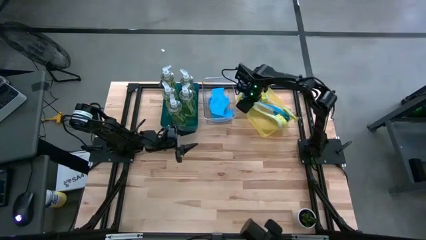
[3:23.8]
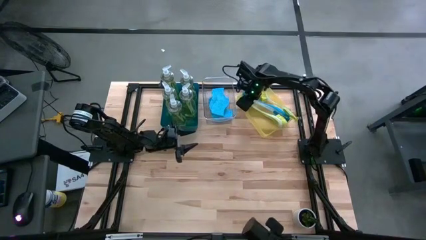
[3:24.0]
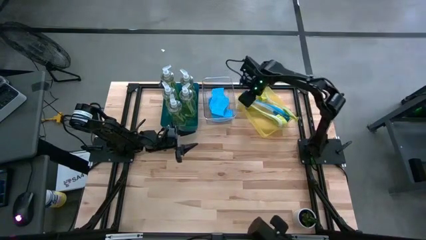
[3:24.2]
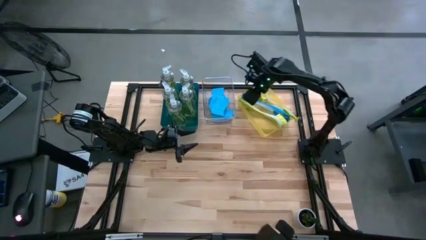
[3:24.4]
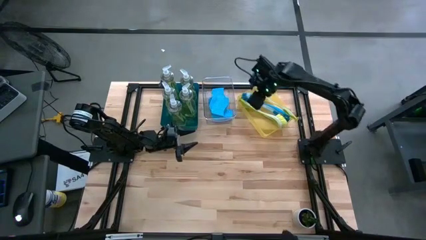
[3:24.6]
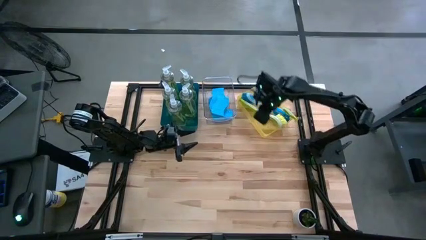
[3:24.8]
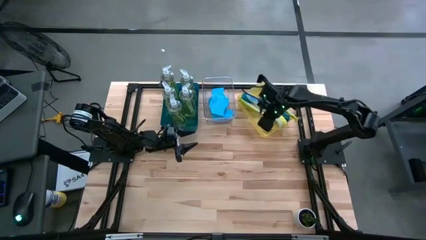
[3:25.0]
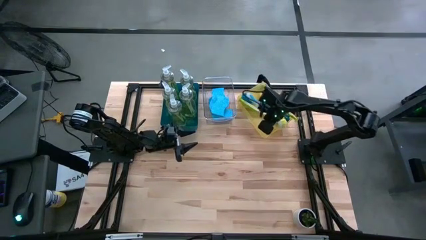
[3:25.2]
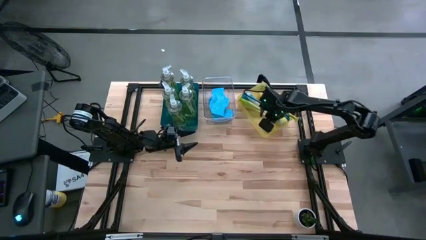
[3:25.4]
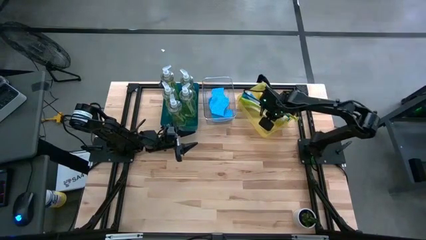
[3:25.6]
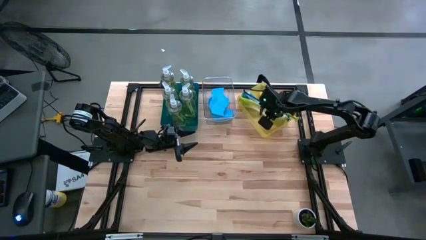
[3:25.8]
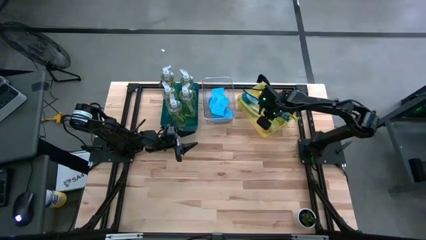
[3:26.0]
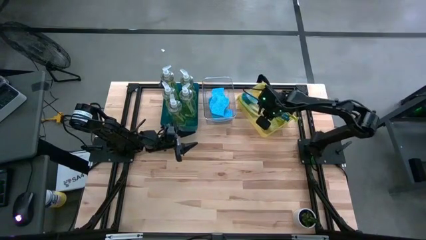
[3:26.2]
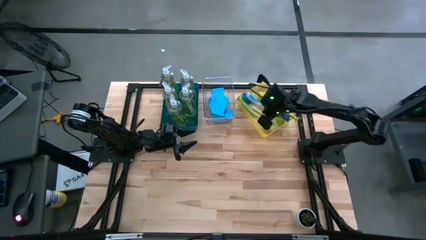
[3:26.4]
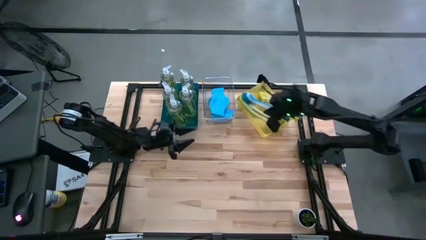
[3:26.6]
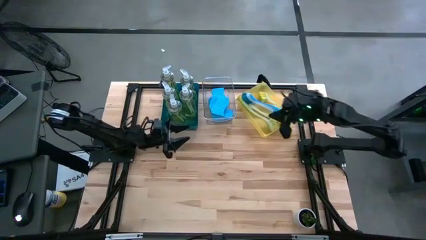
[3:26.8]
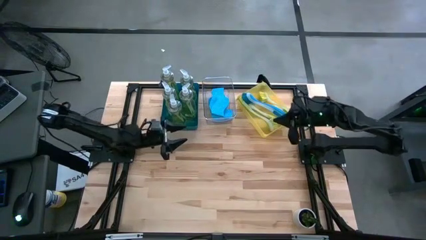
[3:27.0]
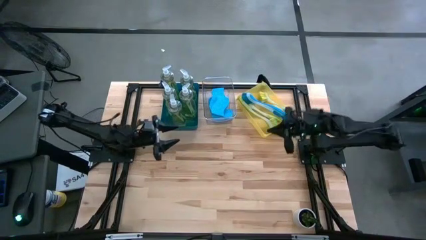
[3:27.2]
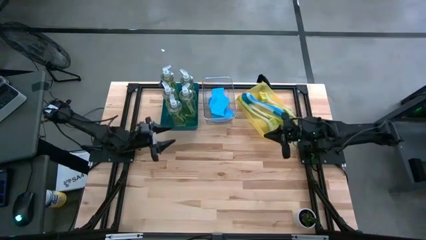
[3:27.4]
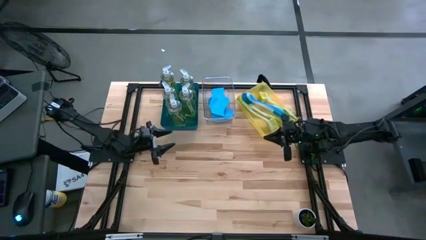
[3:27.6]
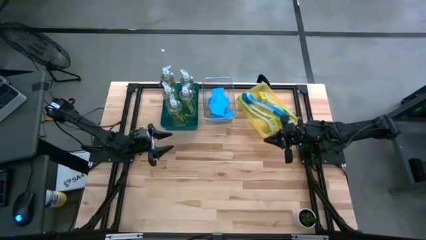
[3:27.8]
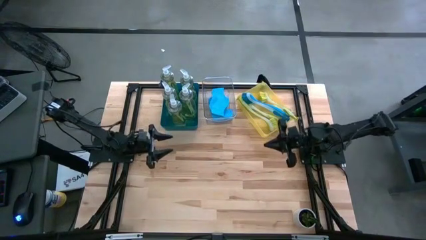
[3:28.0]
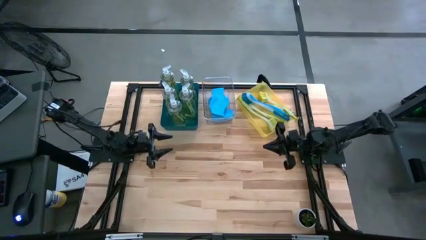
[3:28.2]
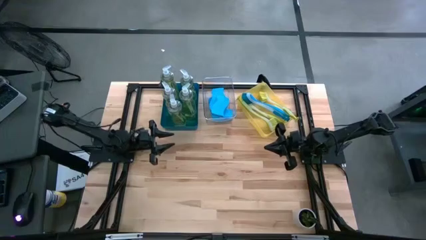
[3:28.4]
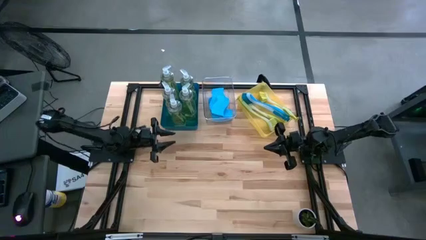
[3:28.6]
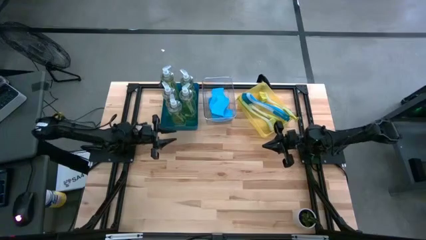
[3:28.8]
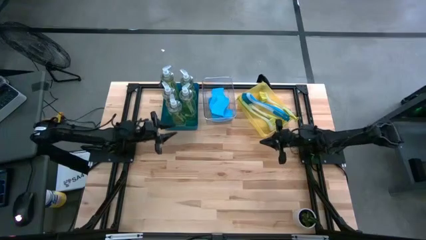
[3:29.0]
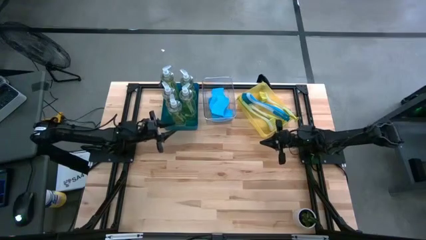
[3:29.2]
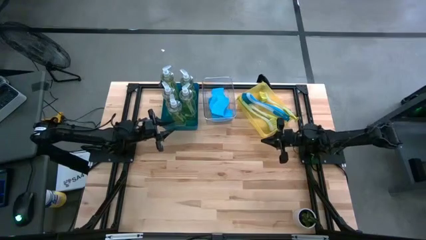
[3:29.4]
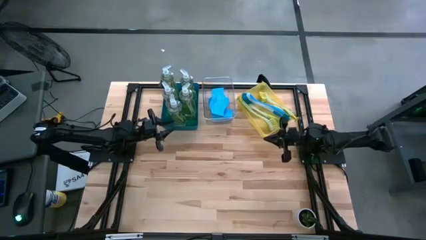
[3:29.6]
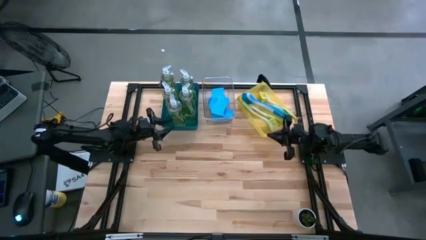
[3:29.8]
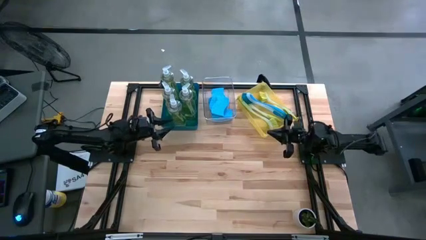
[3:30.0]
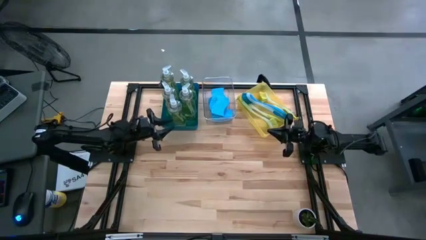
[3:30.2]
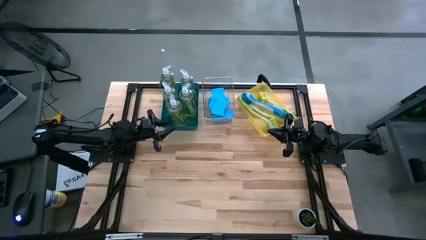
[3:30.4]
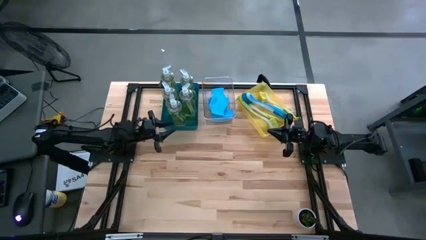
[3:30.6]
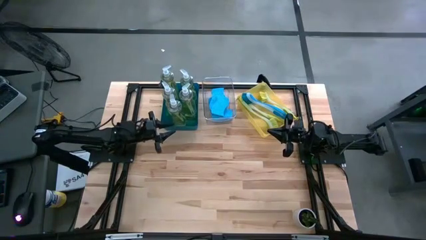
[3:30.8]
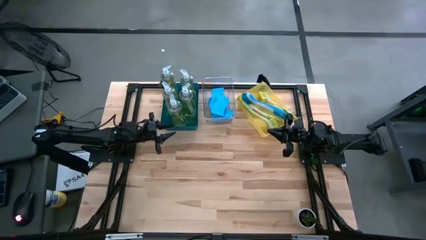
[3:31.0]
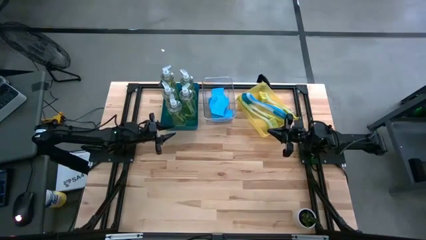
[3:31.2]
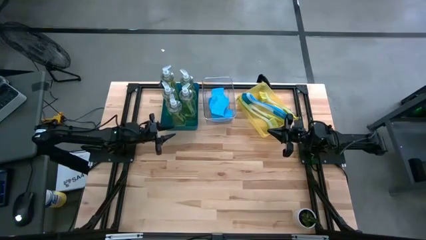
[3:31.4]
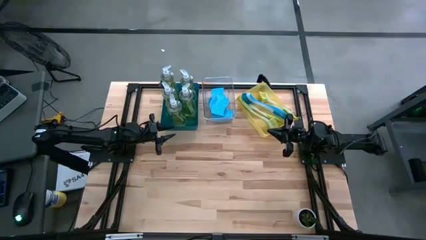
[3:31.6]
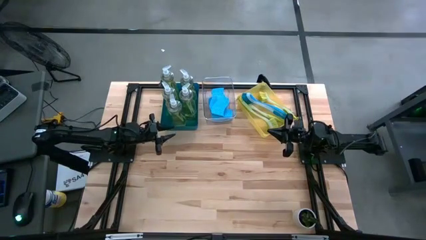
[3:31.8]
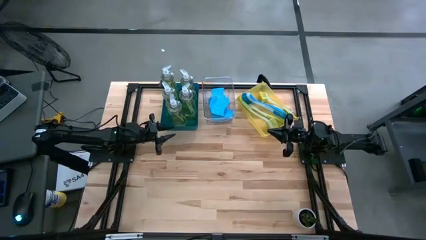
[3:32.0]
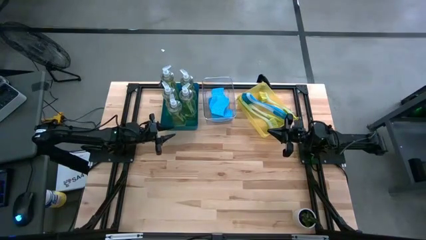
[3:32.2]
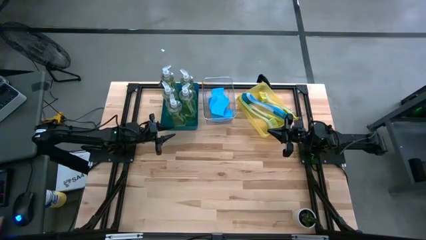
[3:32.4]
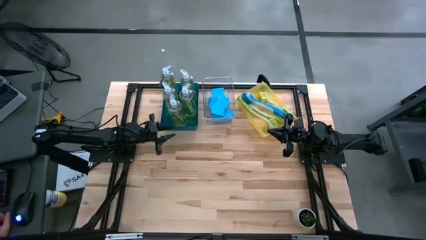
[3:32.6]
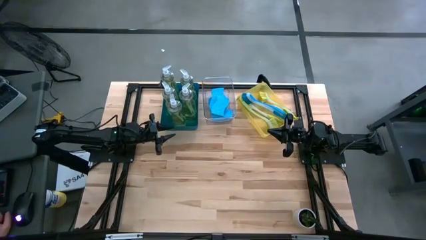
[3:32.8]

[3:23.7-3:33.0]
Task: Pick & Place Kitchen Sink Supplies
Return to Home Position

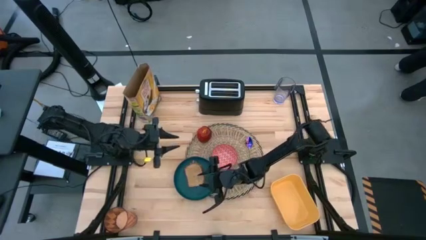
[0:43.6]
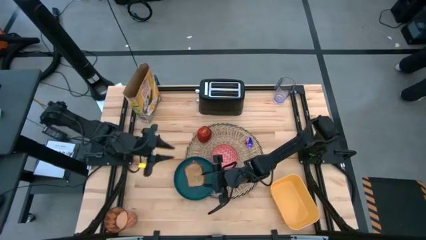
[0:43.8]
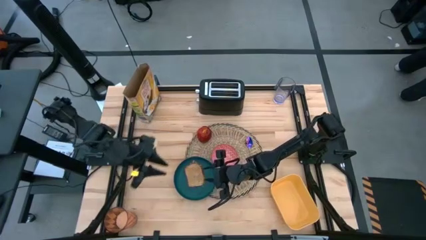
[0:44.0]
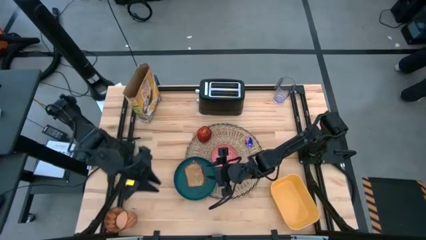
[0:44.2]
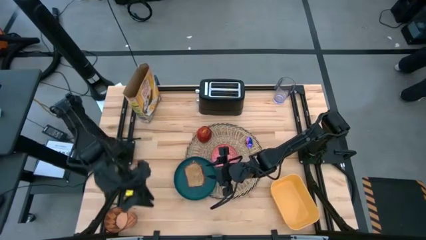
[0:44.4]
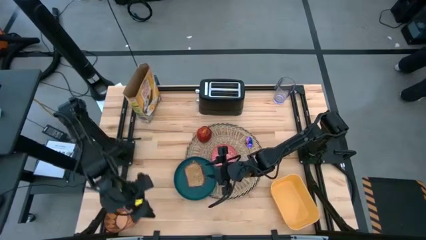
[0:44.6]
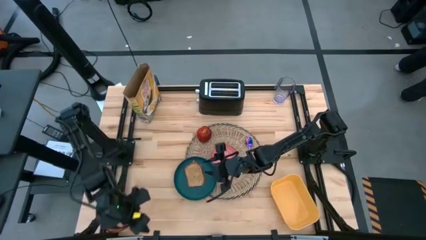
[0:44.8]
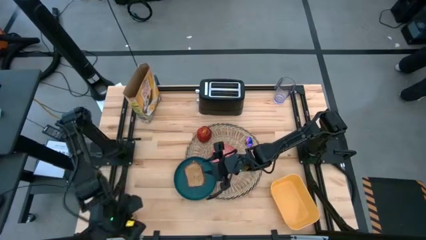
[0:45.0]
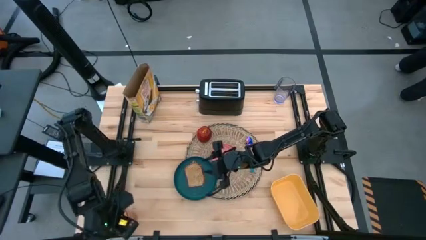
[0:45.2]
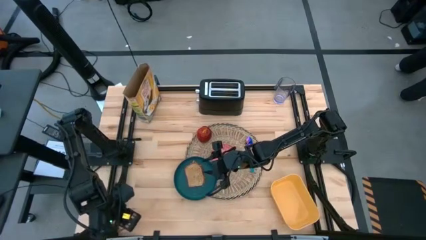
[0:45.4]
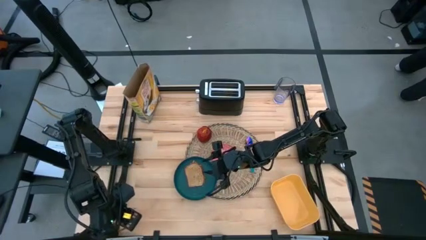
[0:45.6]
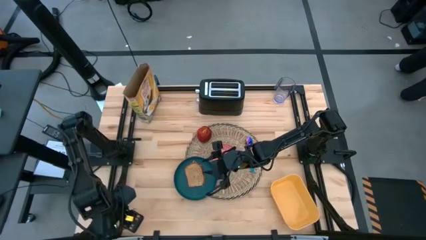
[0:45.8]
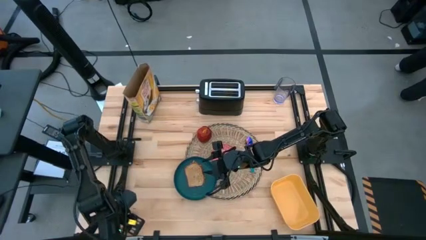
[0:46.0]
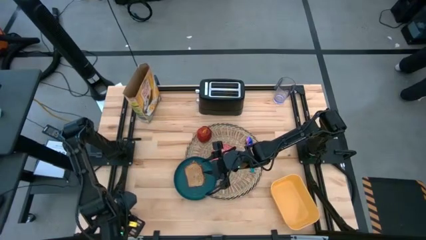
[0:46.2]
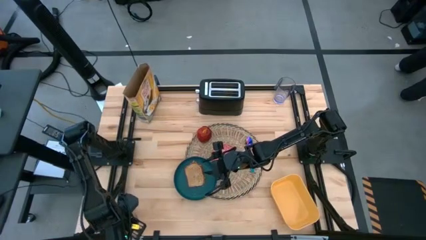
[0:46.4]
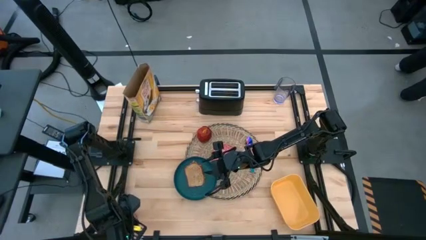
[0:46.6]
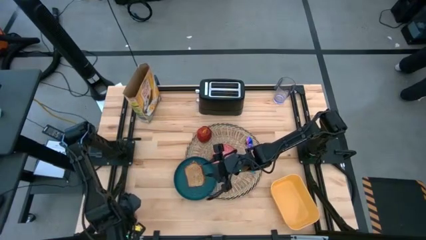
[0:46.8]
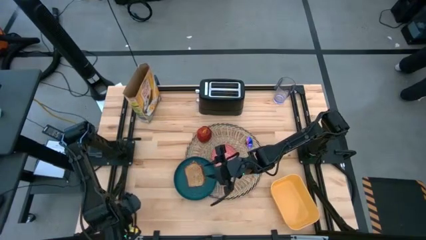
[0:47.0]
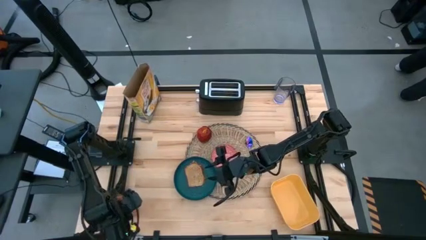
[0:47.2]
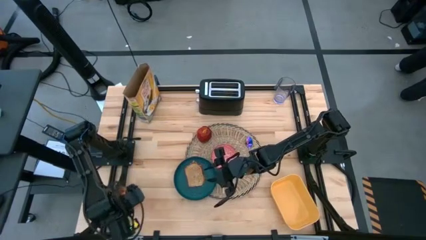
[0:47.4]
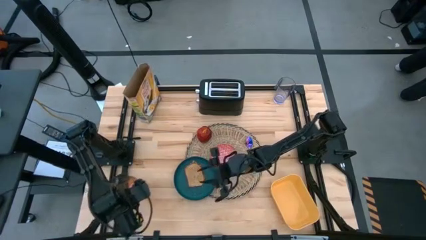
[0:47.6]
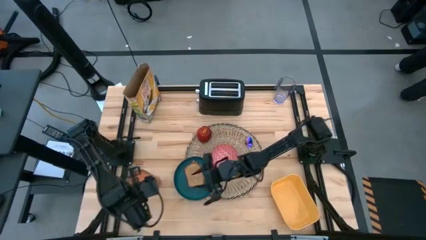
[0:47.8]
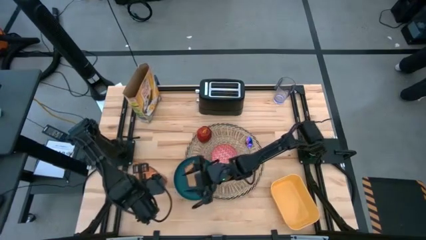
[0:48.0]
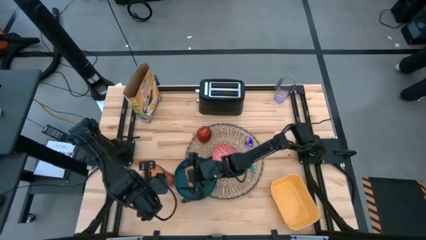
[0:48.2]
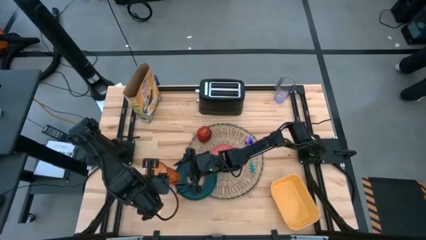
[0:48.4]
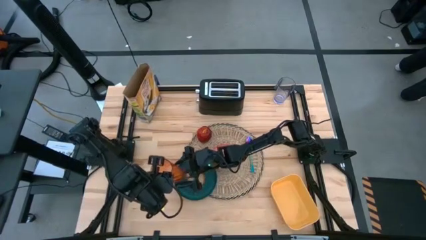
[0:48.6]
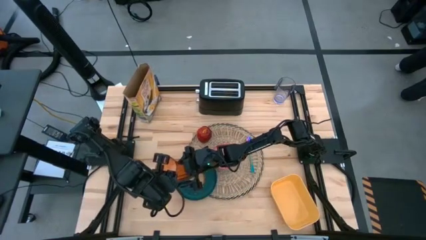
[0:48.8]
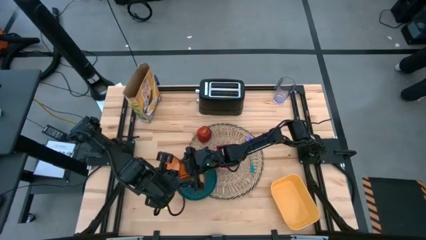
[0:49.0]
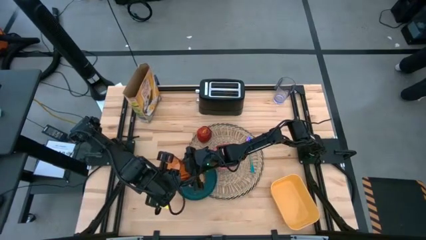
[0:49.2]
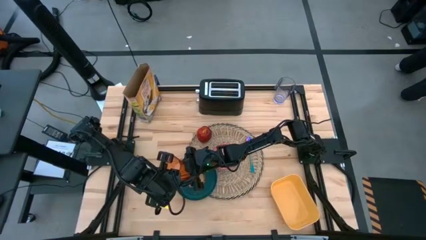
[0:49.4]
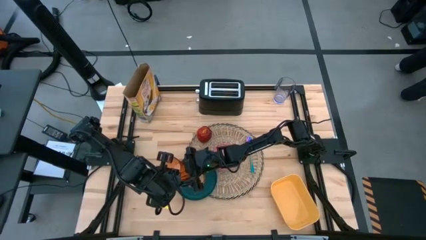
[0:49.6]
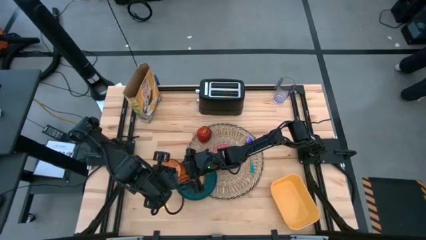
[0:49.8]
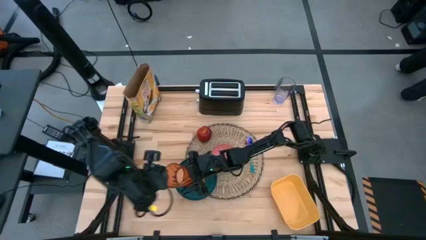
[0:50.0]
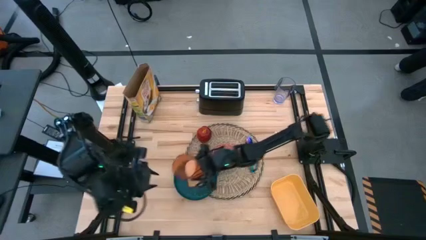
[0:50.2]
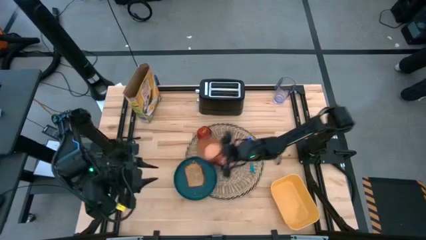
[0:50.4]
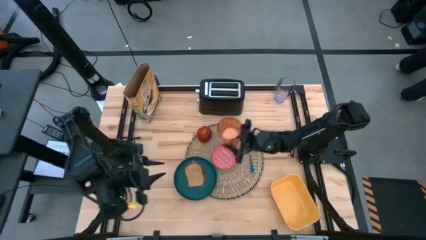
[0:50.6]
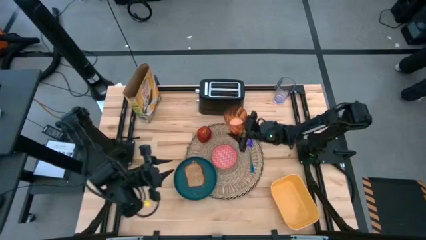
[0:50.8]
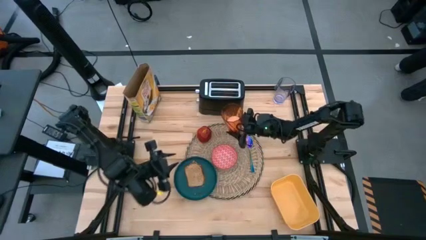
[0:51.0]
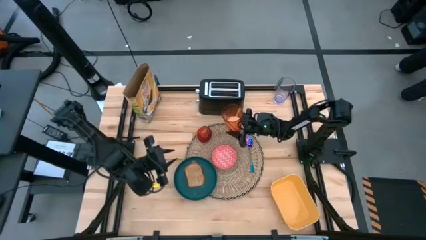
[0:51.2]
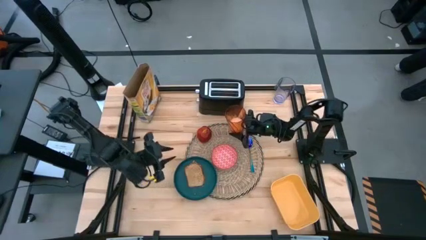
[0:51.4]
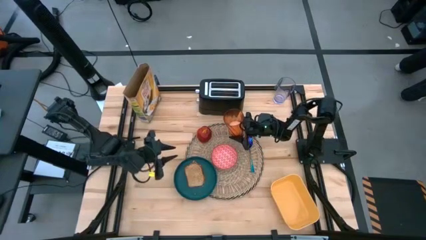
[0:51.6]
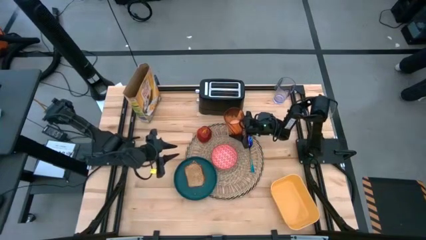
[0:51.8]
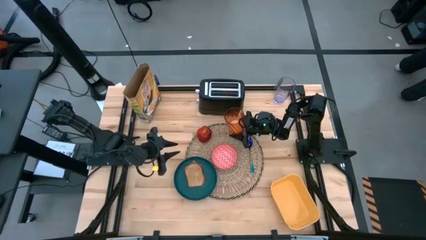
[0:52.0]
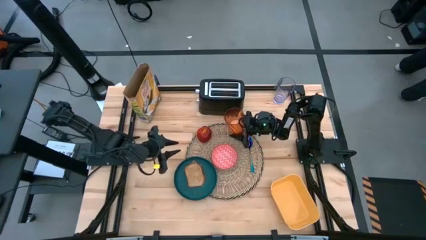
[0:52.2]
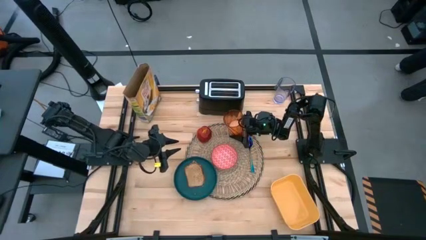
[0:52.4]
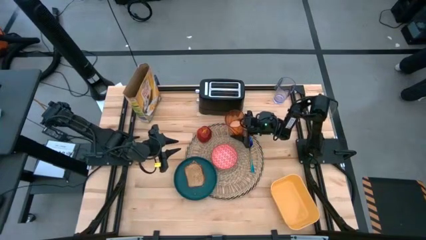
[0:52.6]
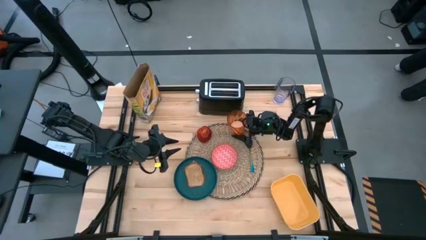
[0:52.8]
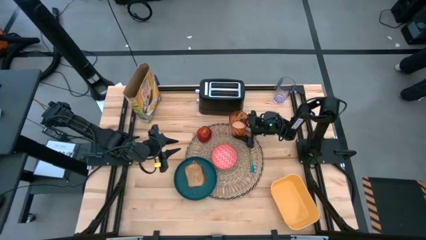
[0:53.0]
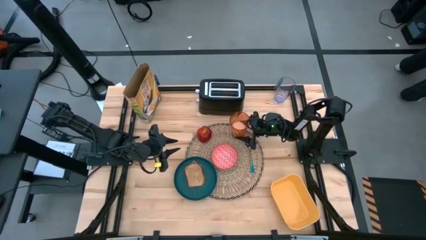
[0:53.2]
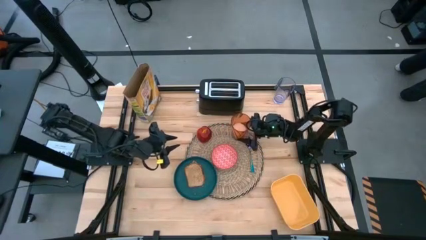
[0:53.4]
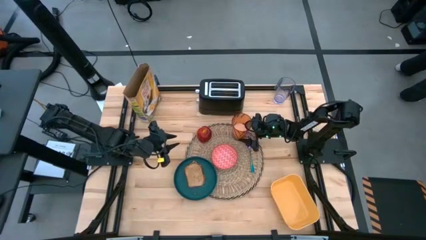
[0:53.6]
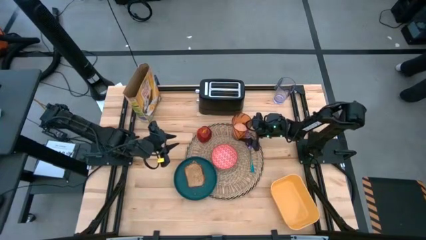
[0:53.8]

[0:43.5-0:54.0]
Task: Arrange a breakfast setting
Put the orange cup on the brown table mat above the iridescent blue spoon
